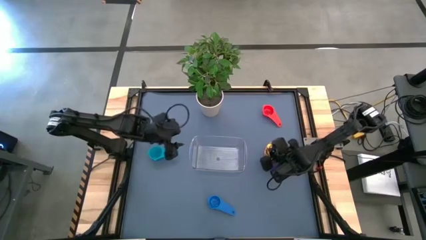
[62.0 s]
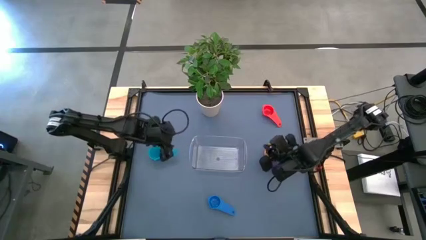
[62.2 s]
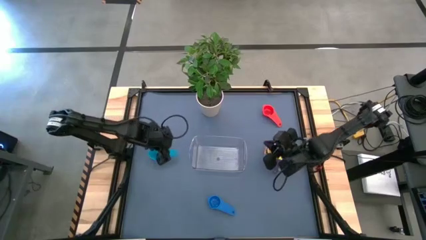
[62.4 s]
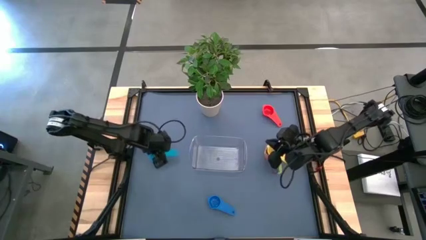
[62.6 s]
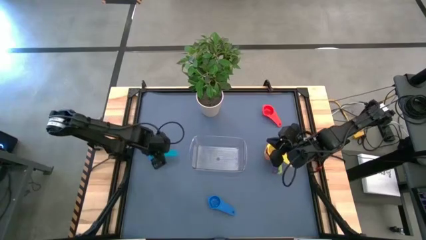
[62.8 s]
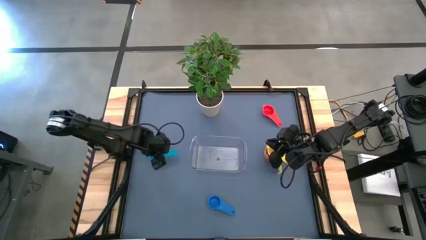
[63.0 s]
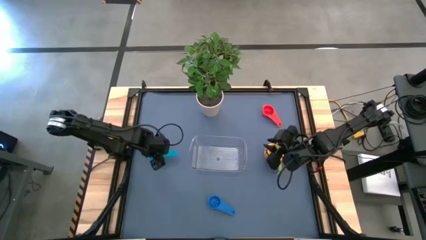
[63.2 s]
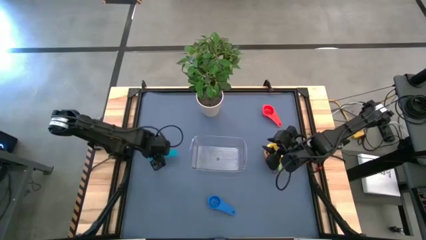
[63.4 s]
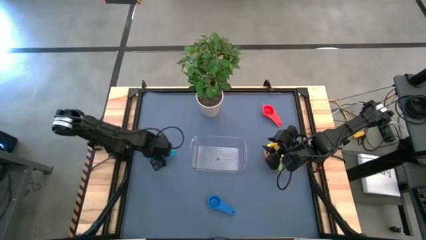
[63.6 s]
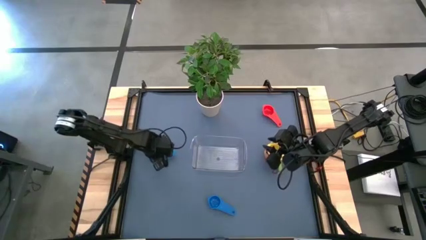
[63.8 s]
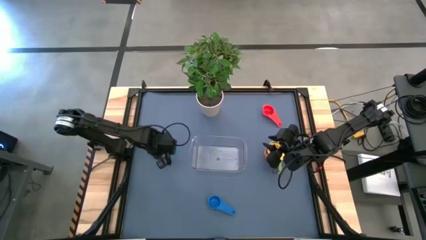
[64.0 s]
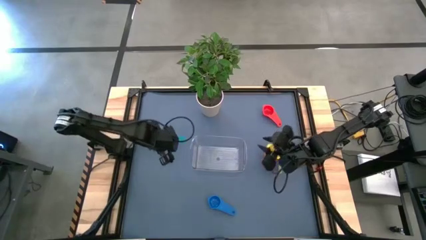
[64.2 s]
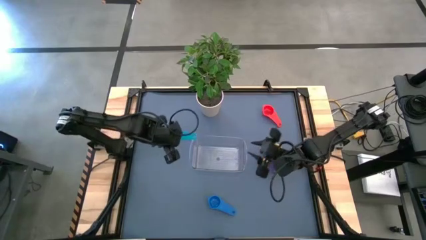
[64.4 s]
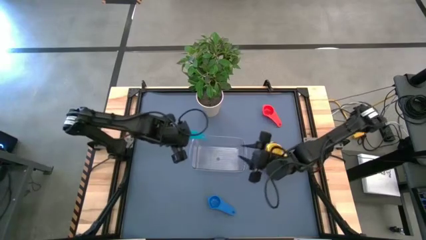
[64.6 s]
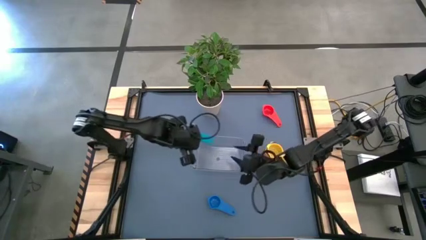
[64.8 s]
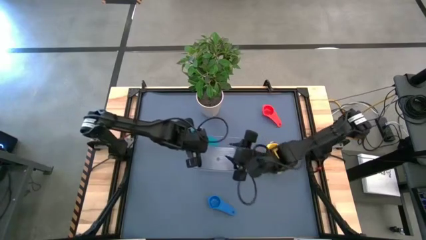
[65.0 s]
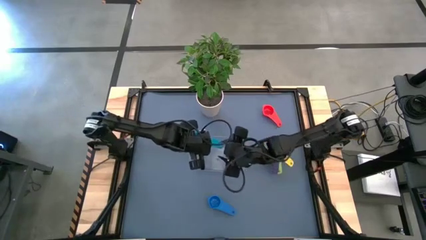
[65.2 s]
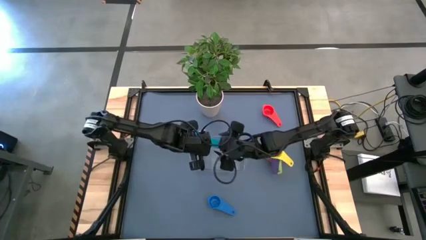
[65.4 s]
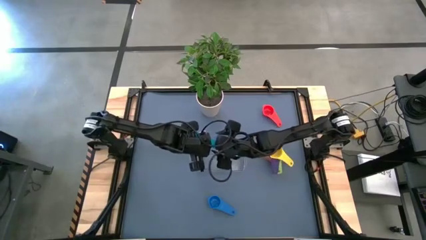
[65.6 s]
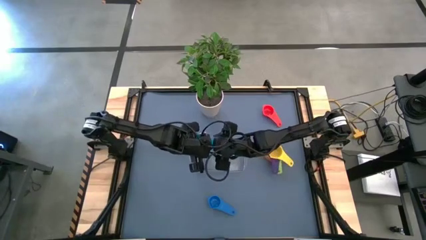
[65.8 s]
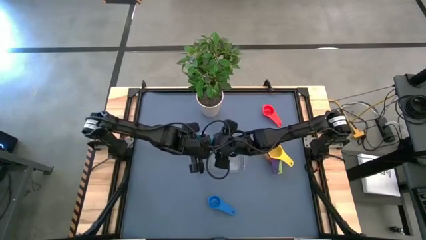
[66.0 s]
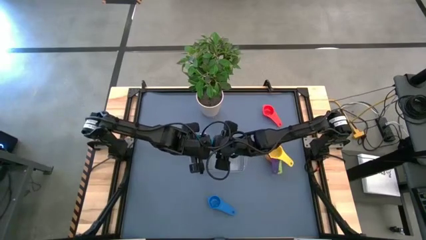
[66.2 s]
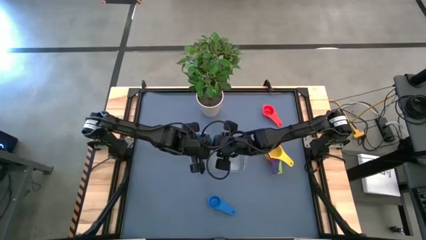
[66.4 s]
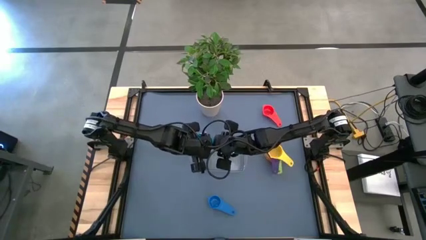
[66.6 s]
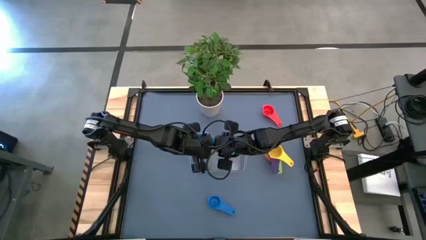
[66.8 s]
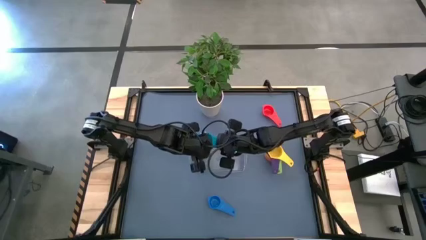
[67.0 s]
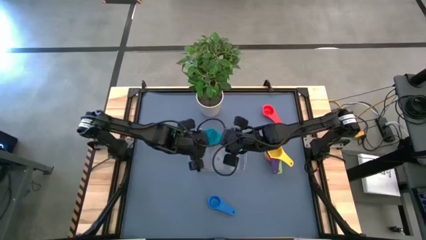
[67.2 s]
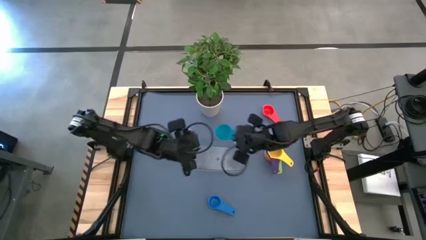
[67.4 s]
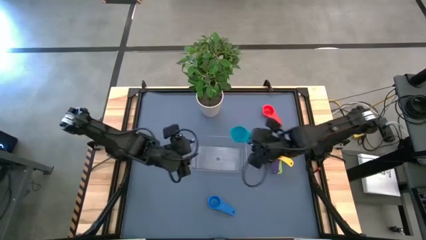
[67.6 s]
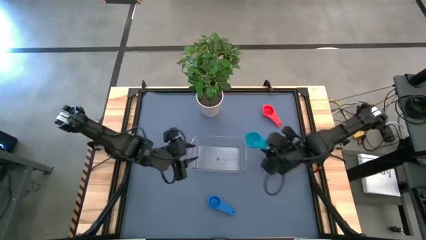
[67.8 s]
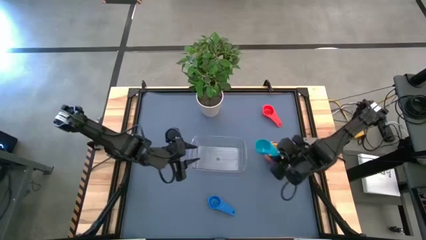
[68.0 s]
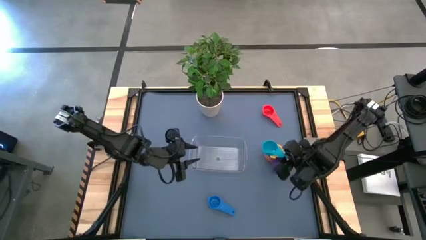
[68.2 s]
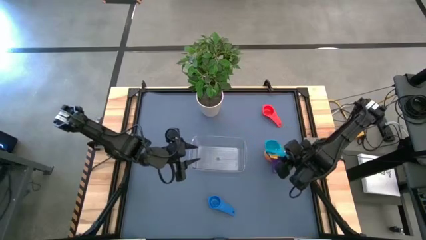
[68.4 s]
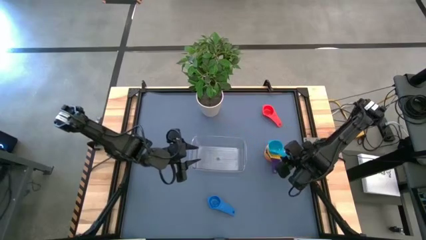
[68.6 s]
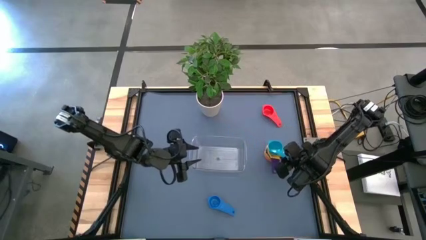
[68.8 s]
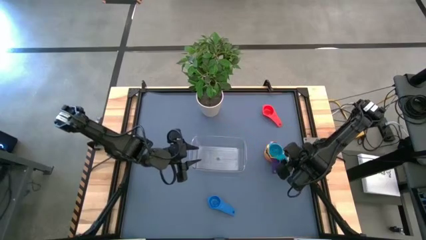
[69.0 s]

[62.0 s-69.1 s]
Task: Nest measuring cups in basket
Stack the light blue measuring cup on top of the yellow measuring cup

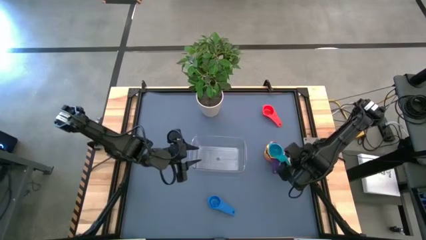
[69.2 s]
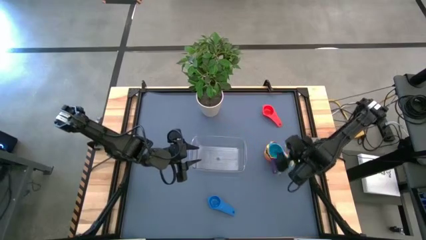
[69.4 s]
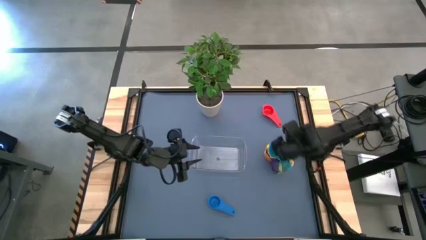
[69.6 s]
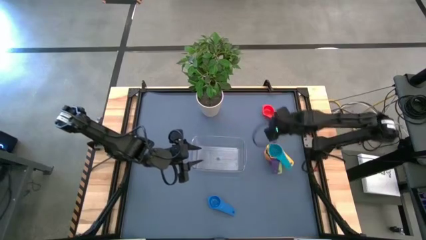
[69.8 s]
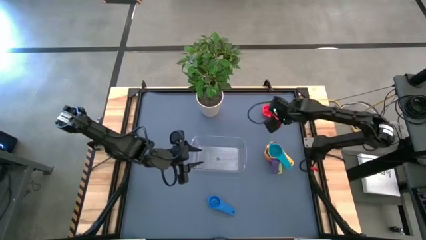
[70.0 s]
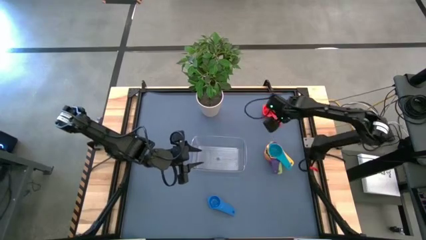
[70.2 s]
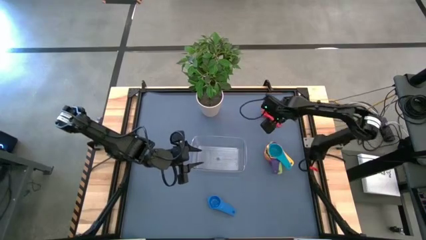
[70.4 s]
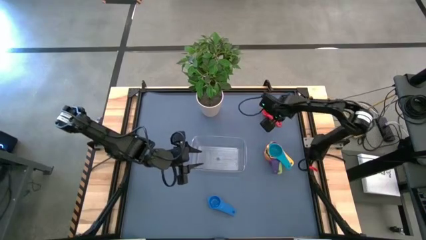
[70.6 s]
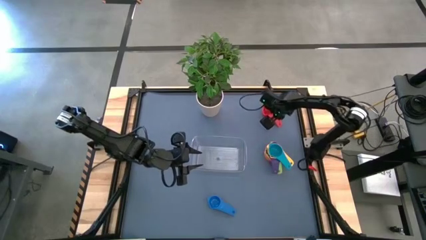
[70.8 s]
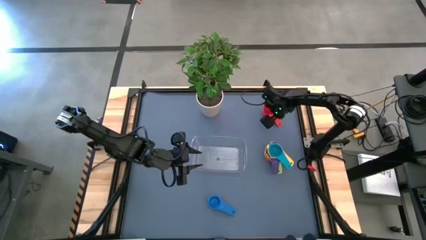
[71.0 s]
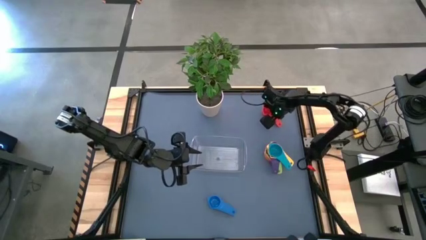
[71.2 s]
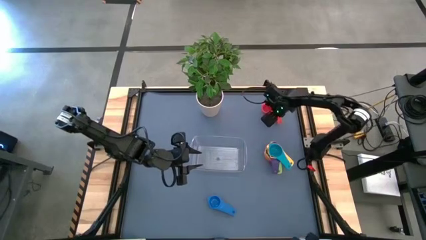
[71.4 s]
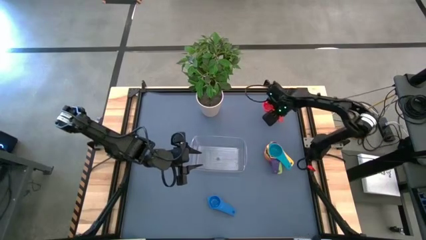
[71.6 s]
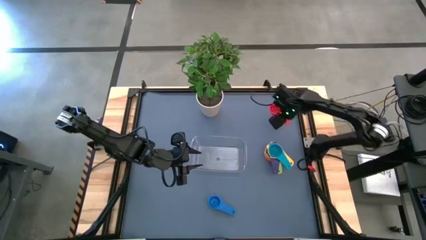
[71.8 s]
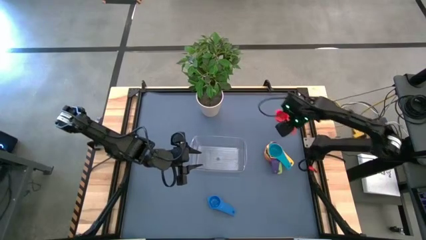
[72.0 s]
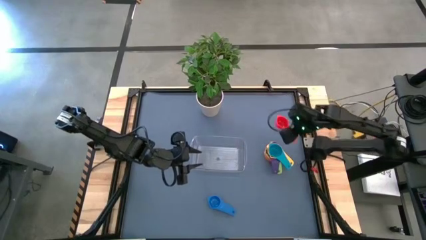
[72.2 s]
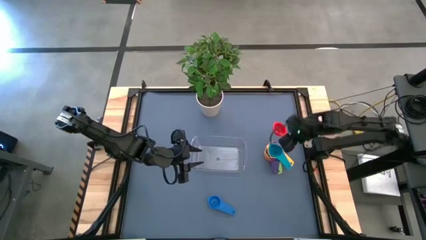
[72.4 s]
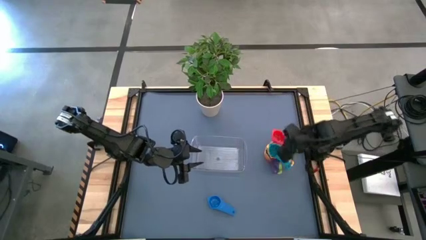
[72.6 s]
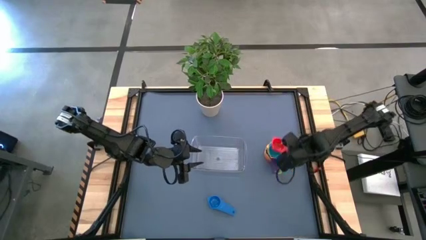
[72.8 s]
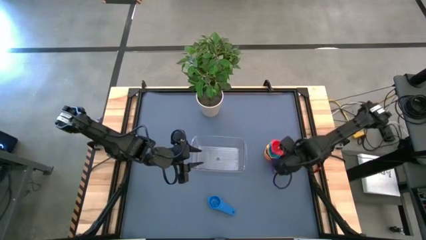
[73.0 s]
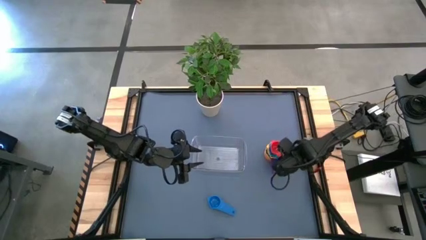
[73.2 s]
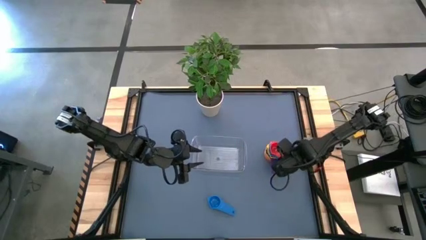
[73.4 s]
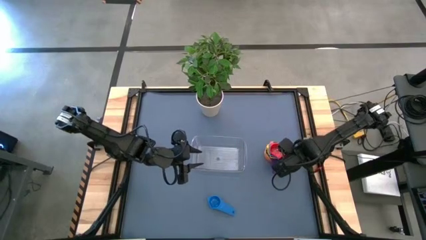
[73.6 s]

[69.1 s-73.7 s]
Stack the red measuring cup on top of the light blue measuring cup

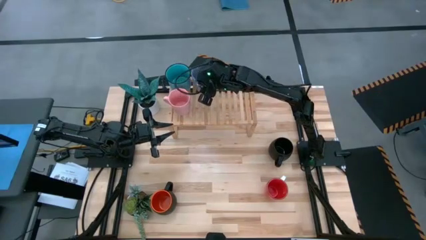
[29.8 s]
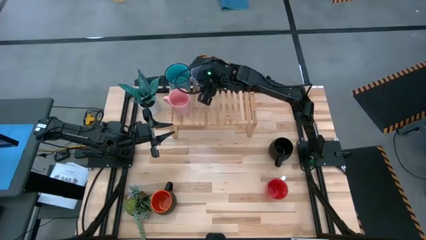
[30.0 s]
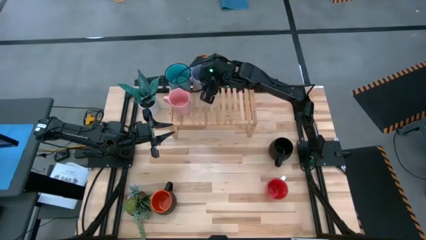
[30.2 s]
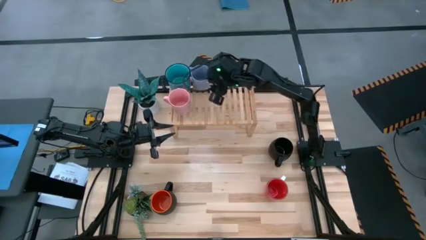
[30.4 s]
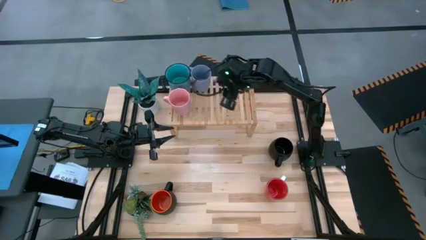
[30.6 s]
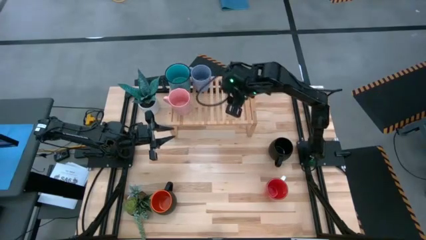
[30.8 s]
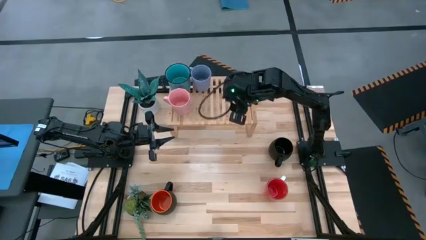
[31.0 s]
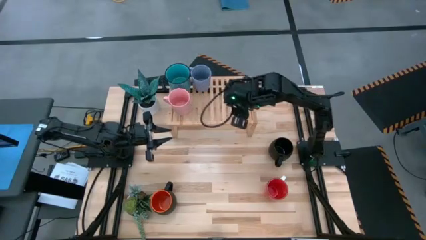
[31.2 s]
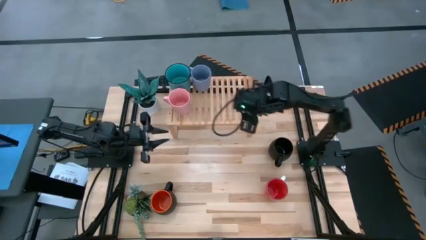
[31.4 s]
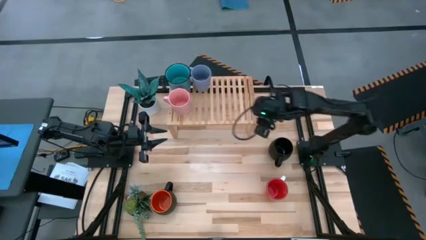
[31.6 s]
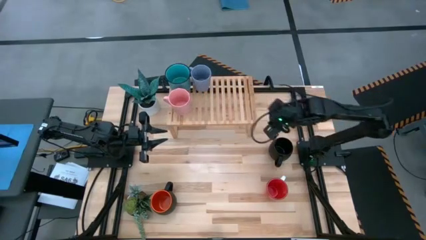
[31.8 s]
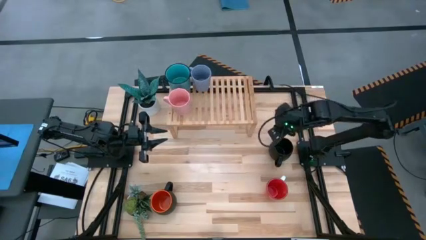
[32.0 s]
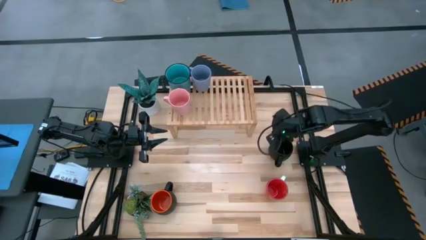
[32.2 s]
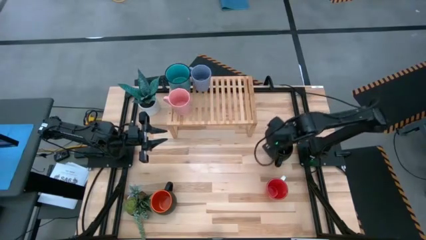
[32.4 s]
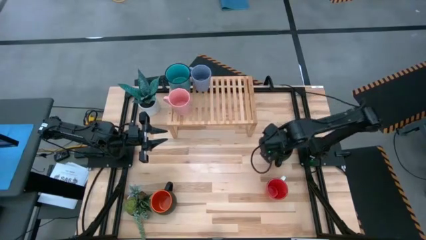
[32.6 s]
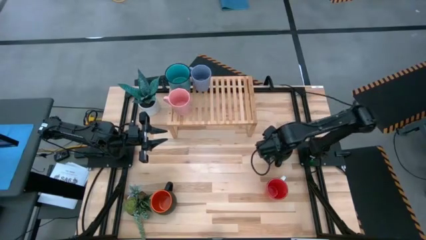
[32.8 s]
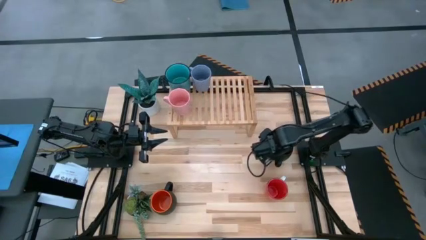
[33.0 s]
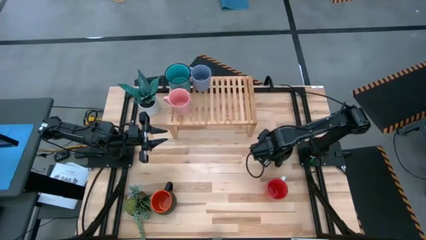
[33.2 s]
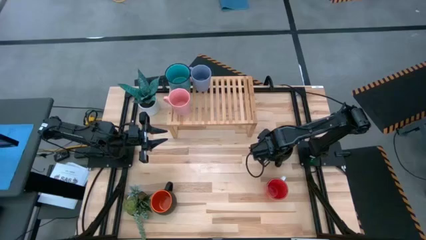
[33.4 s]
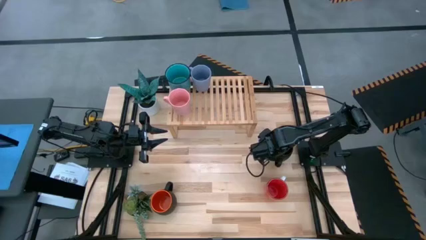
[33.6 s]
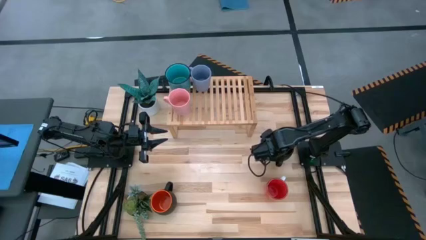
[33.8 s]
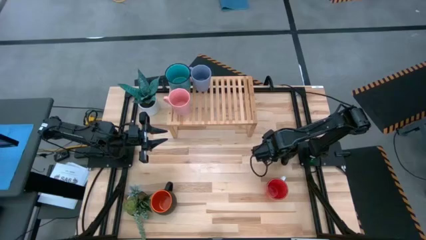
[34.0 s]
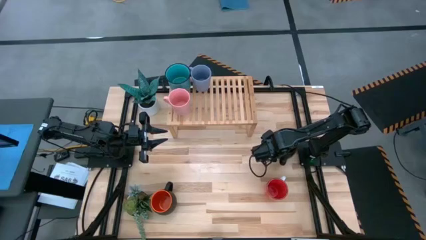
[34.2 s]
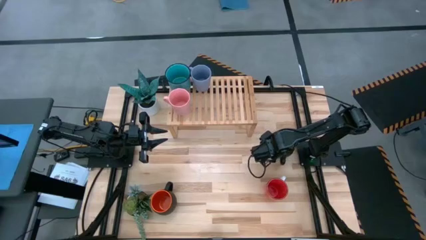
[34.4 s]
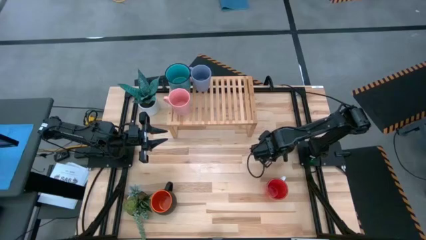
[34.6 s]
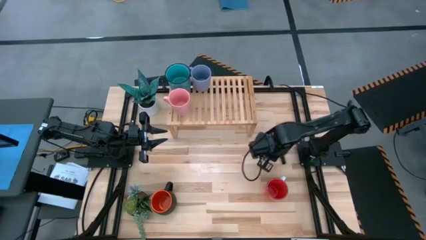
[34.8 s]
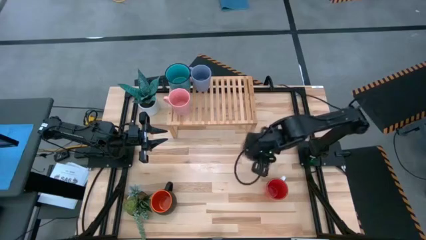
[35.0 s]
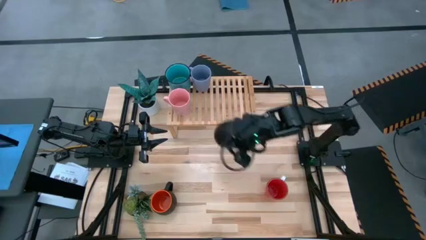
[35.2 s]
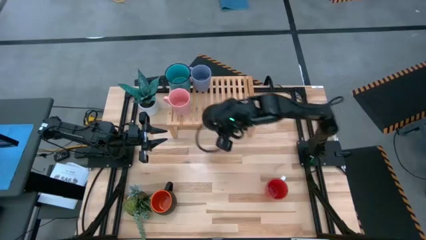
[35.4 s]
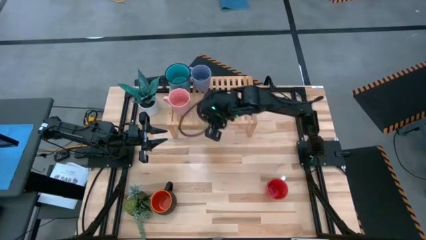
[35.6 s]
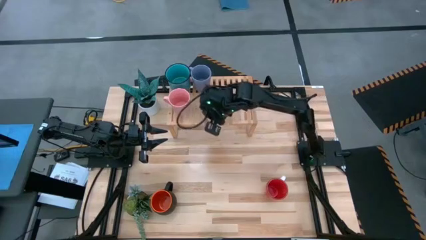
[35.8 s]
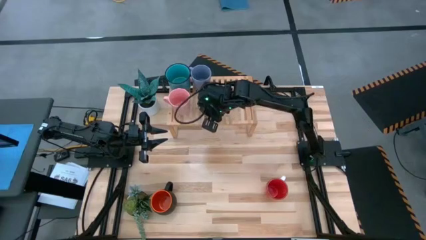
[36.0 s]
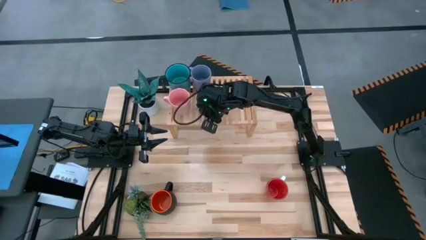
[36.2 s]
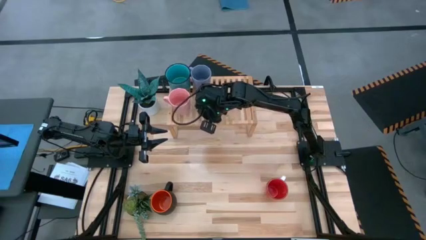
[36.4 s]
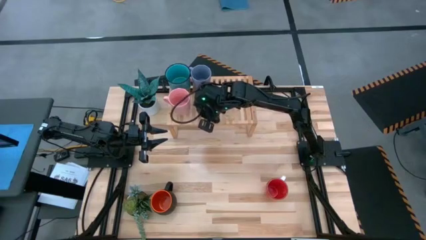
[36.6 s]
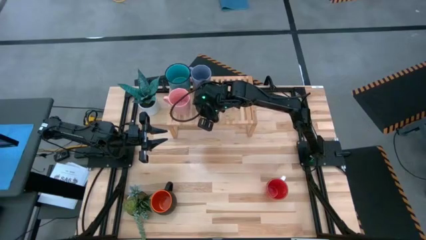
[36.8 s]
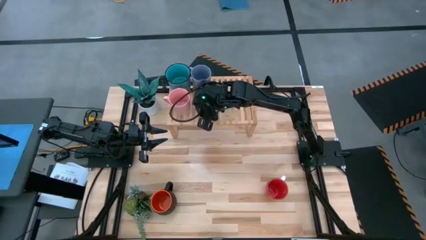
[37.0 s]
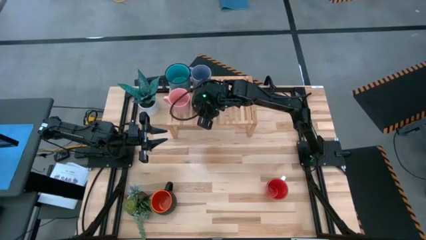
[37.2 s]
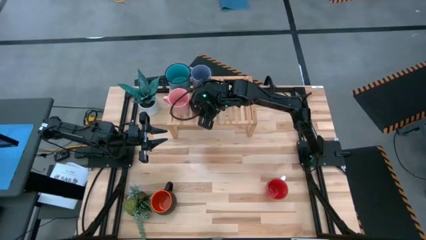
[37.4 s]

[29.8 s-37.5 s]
Task: Place coffee mugs
Put the black mug on the shelf
